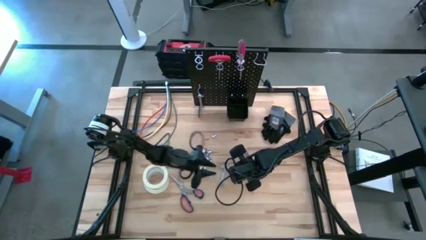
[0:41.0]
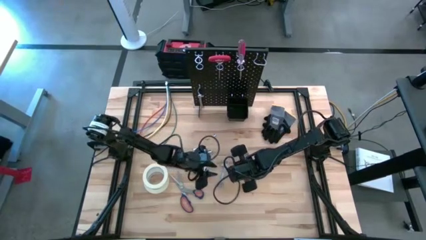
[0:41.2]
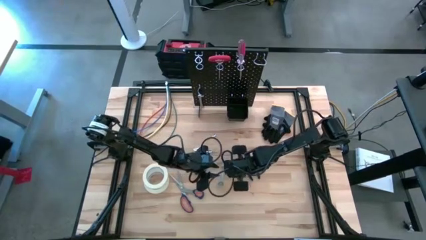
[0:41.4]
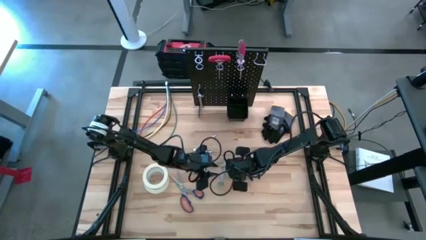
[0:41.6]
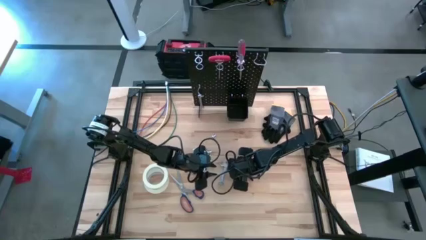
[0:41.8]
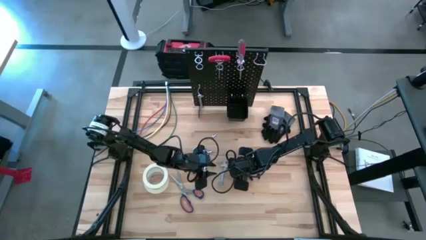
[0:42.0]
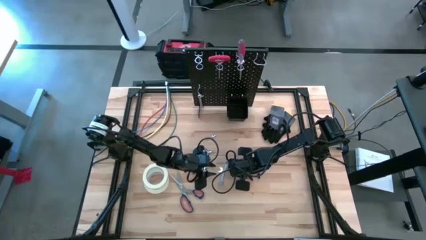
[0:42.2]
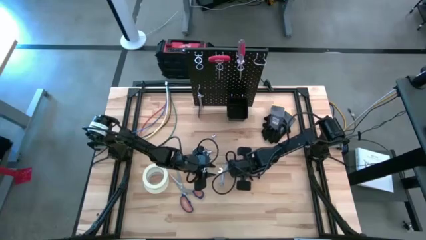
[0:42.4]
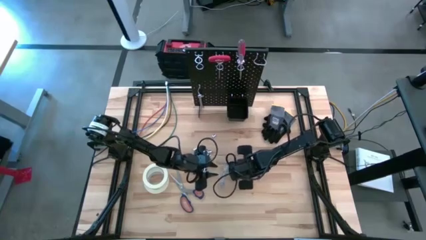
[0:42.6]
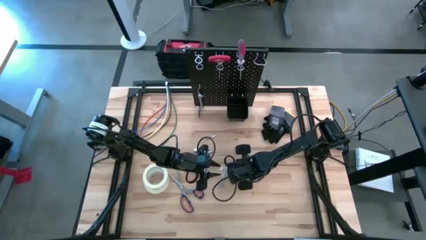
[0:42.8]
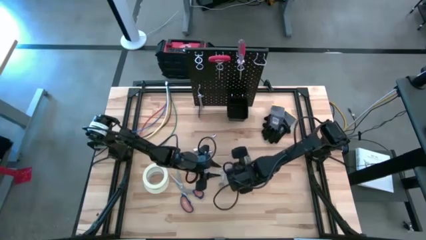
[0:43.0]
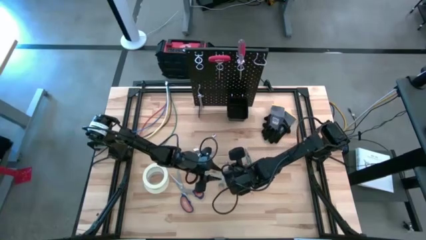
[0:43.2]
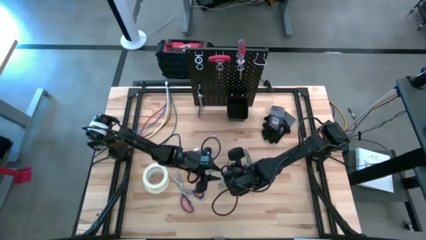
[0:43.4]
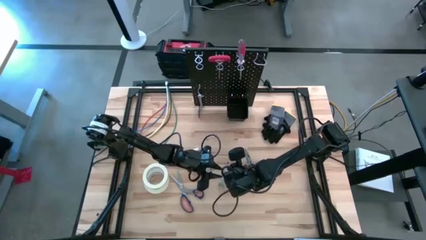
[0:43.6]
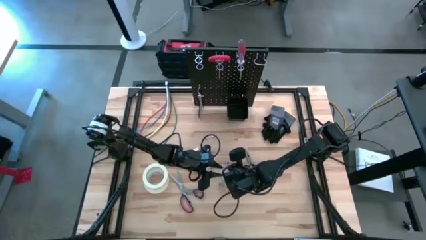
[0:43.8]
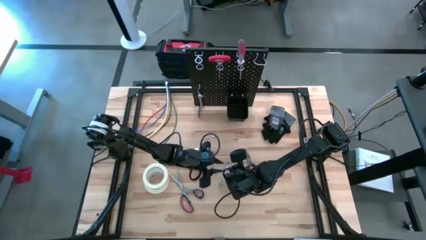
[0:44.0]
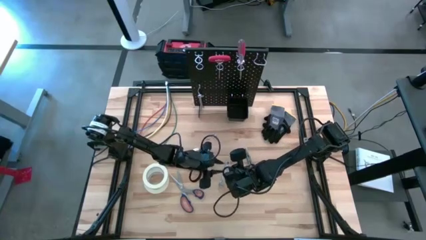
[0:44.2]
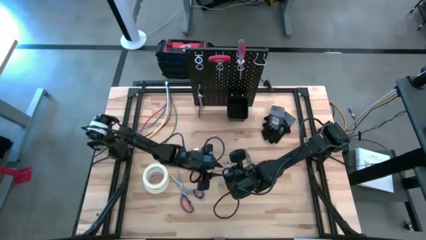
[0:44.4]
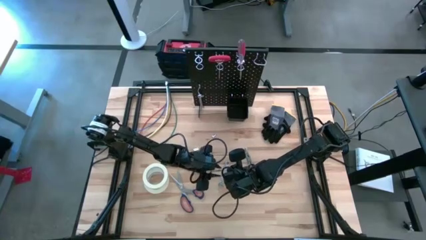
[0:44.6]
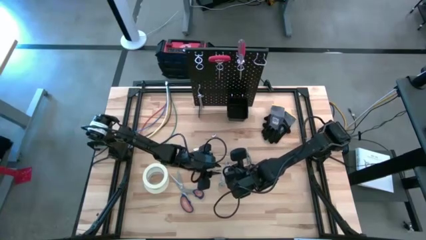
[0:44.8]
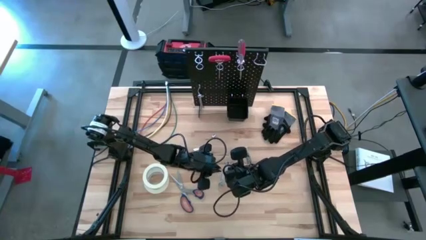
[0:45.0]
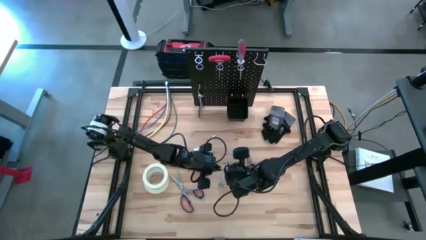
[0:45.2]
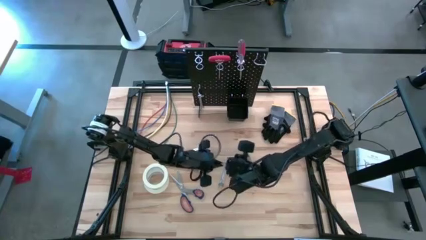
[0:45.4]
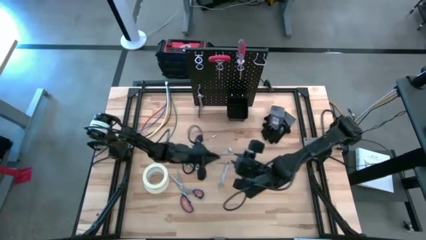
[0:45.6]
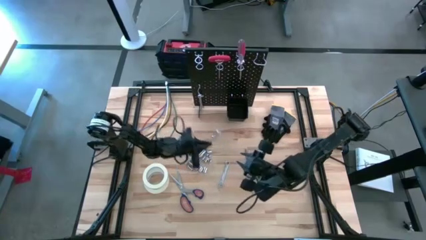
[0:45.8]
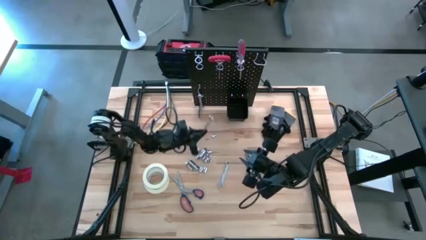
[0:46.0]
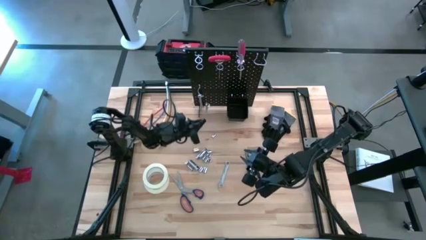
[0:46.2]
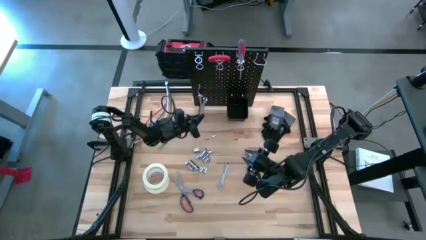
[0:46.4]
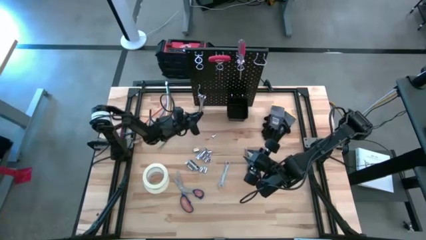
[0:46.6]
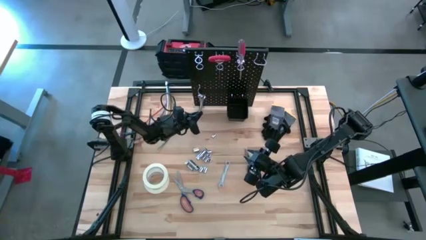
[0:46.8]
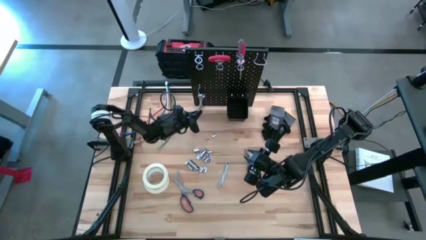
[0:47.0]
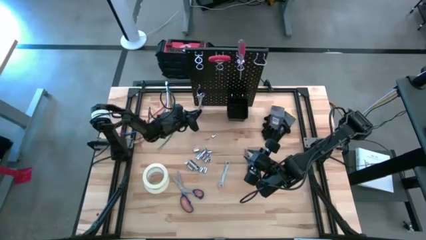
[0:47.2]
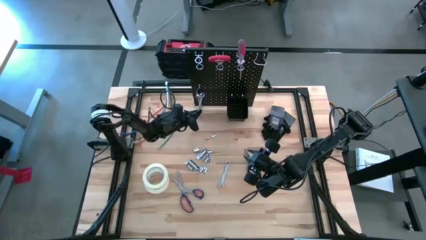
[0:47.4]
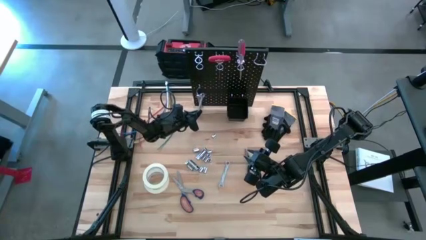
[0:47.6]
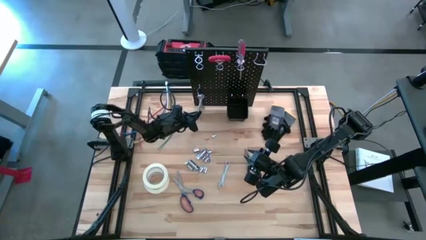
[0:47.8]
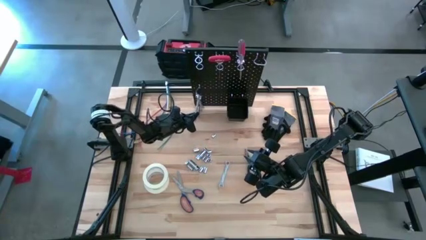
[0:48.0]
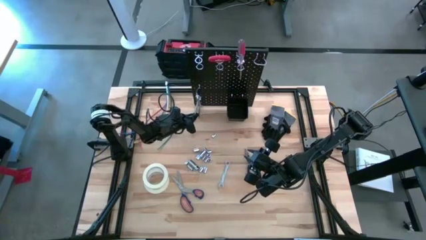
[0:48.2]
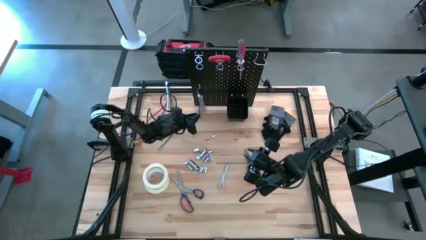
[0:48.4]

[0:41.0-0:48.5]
Task: Hang tools onto peg board
Hang the wrench on the peg board

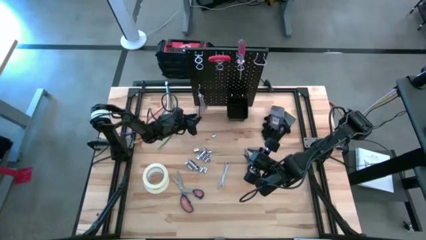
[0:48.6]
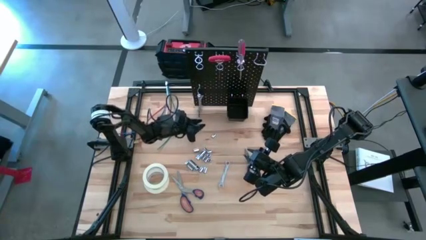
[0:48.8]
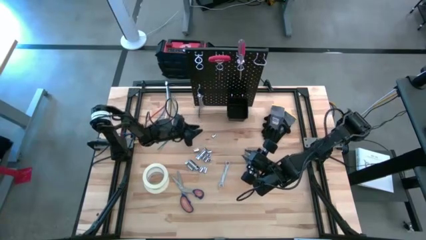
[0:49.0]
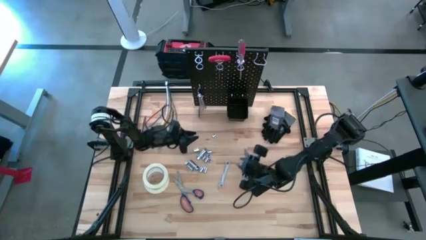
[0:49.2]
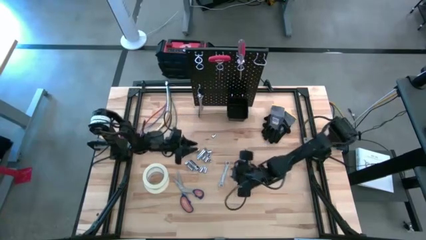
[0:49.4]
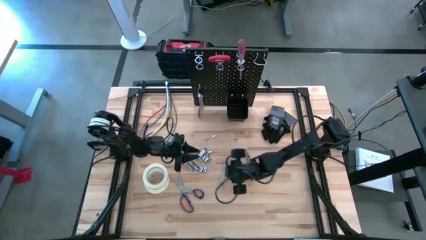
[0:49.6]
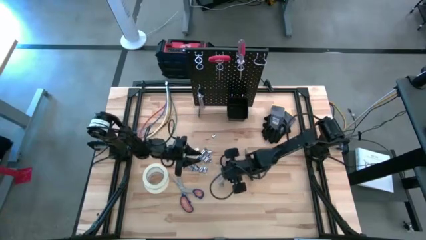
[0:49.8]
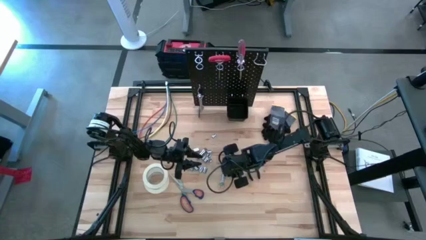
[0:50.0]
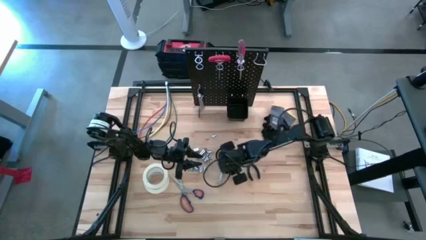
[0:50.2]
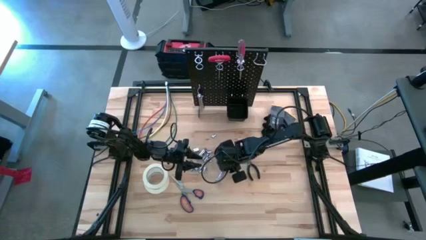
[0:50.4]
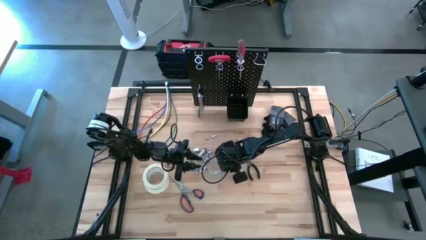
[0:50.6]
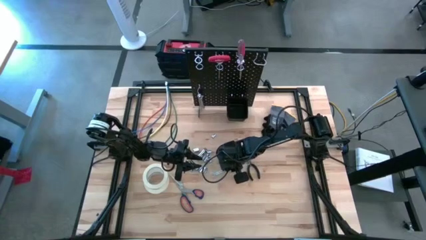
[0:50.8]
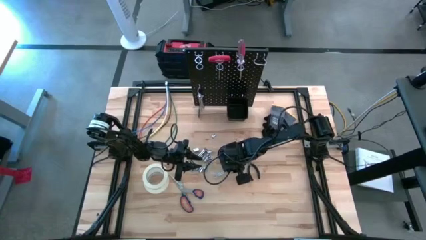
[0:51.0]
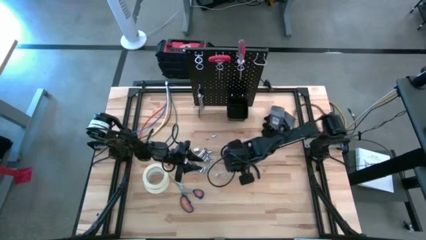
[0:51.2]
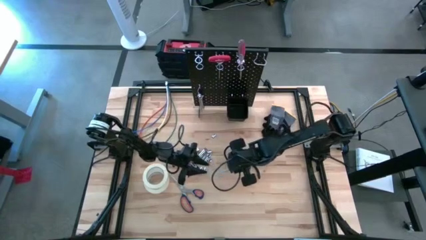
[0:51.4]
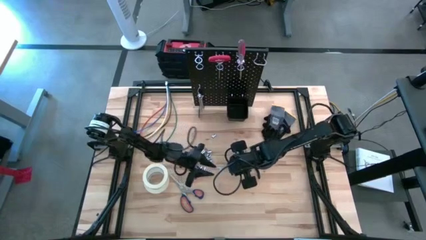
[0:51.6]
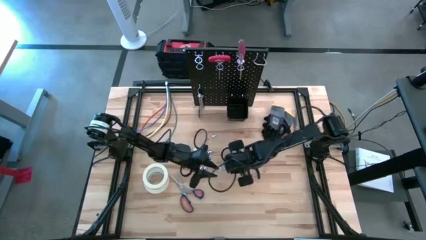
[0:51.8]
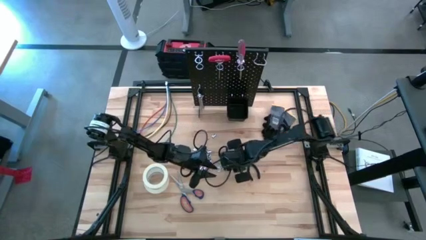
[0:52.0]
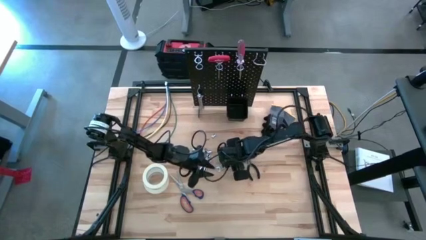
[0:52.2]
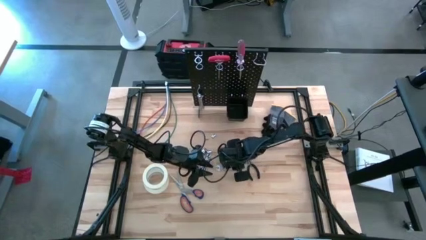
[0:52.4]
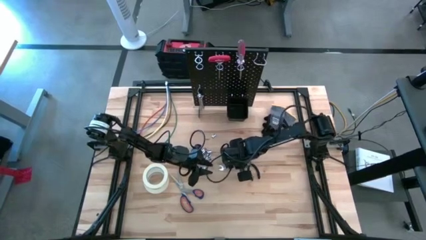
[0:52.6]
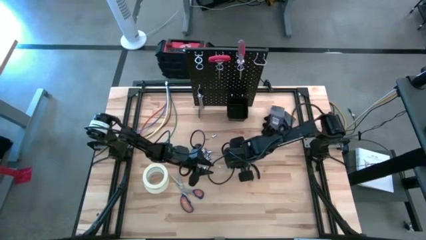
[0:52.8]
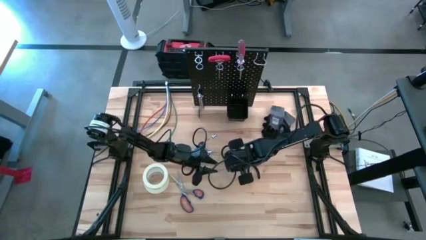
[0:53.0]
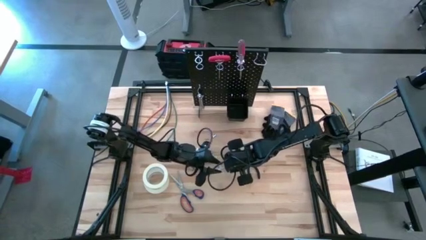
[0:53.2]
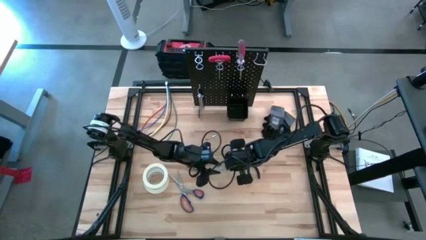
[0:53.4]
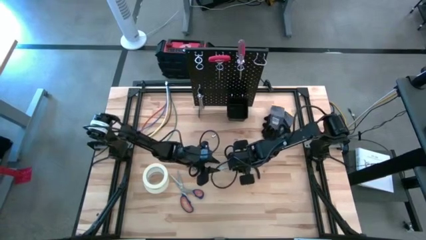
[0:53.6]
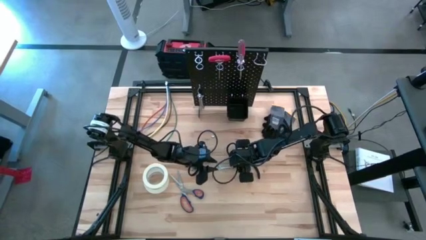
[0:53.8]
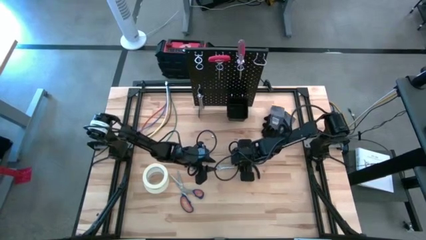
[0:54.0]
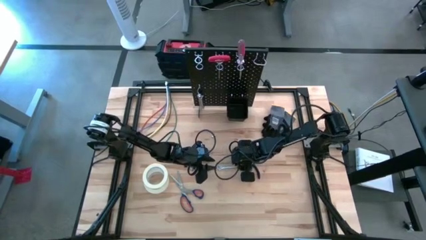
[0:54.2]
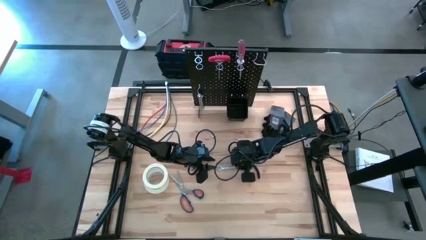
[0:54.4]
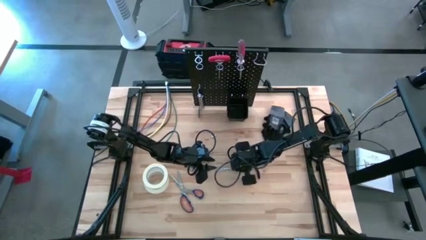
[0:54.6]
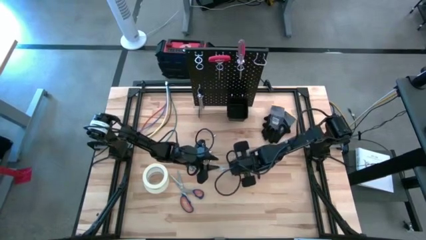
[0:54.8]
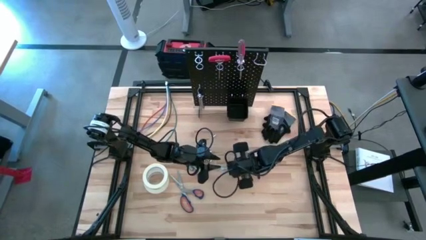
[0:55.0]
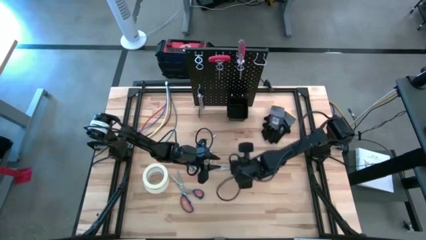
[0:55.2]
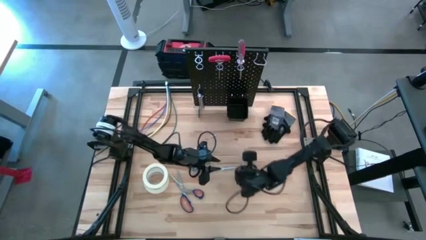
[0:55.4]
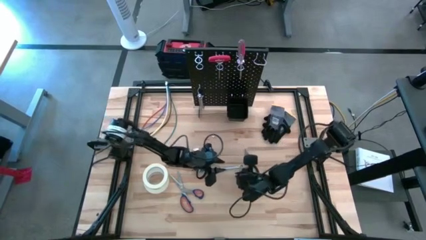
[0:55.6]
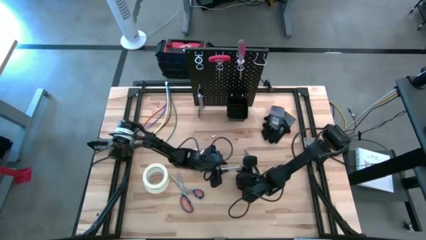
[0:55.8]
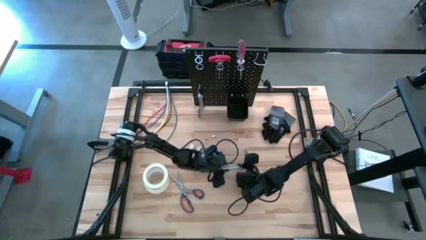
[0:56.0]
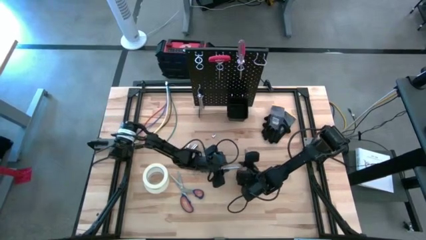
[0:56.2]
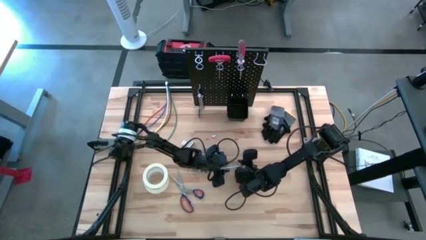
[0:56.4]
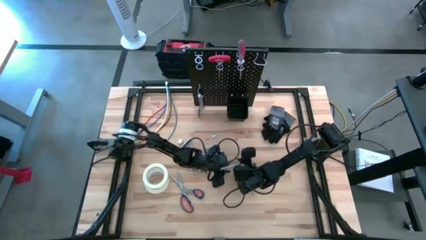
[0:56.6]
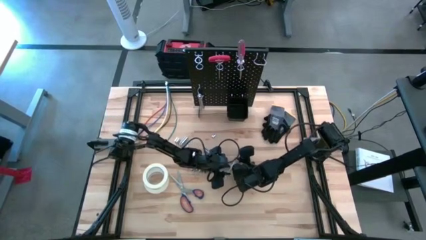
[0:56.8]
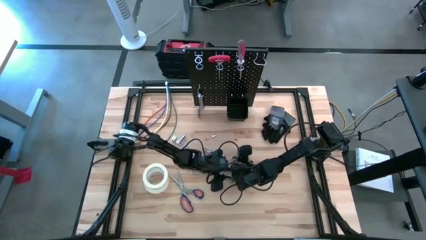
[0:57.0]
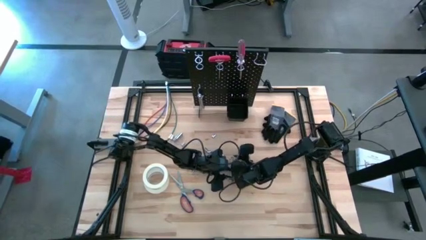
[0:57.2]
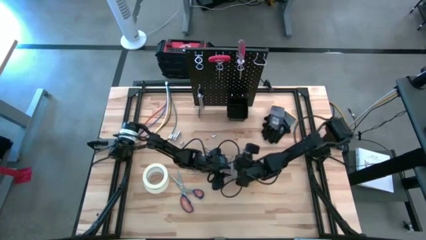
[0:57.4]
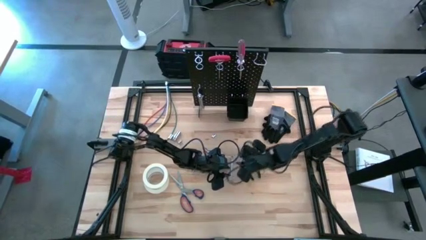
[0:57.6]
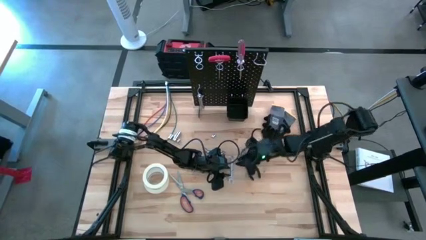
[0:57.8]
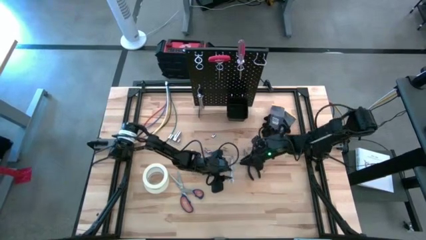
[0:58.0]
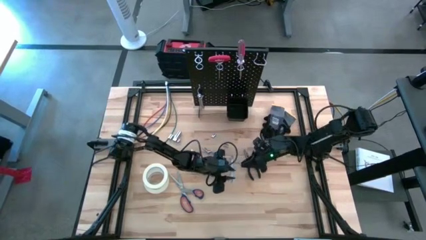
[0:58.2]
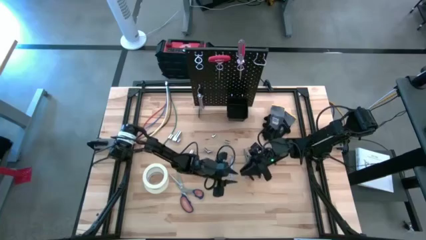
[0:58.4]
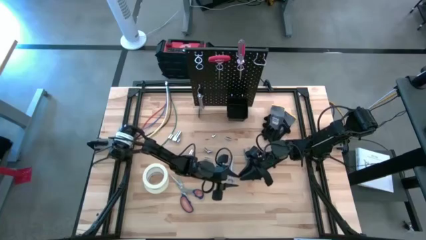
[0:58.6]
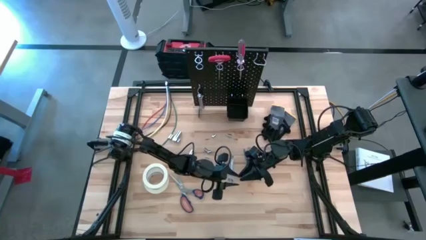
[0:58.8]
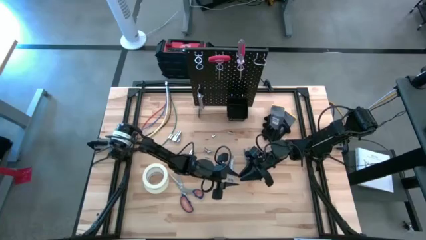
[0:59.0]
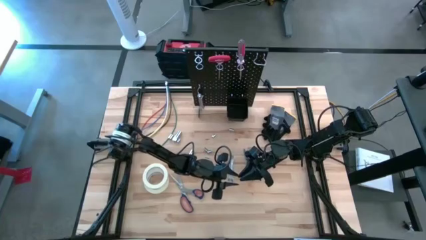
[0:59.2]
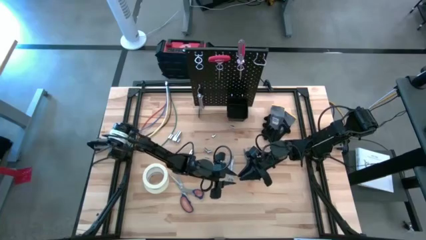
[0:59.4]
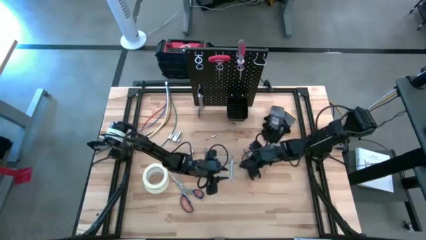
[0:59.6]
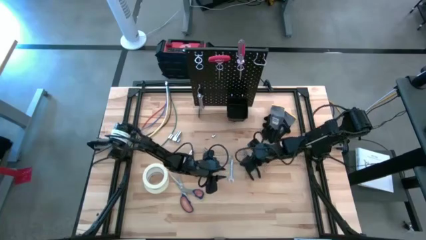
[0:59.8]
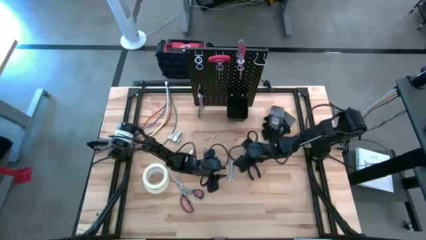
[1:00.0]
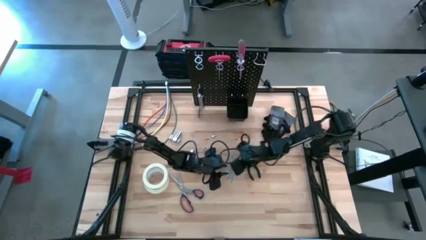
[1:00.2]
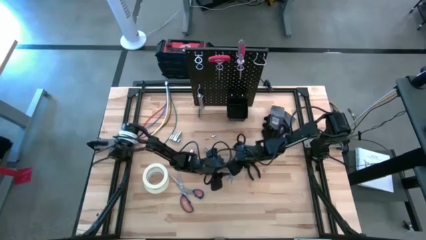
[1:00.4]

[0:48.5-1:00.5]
Hang the wrench on the peg board
